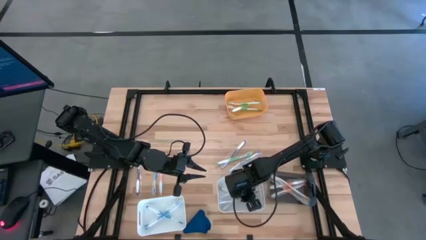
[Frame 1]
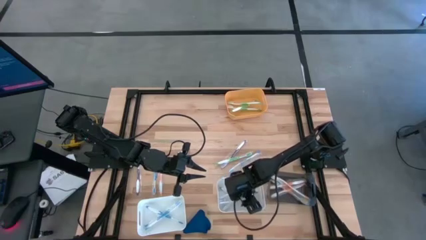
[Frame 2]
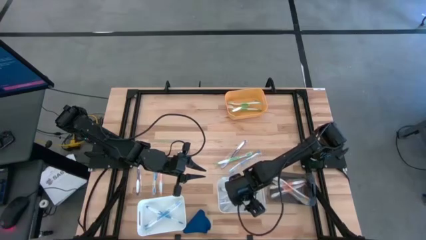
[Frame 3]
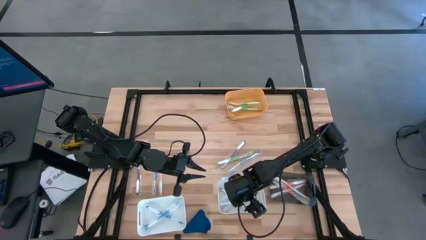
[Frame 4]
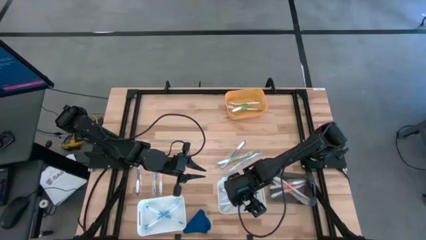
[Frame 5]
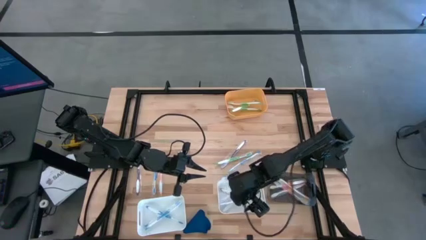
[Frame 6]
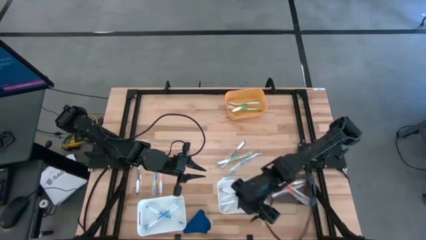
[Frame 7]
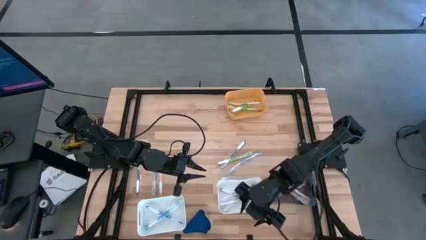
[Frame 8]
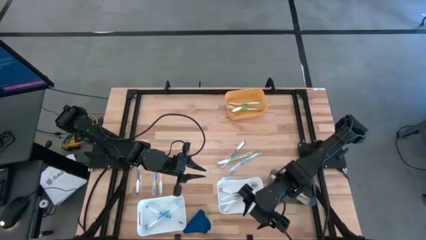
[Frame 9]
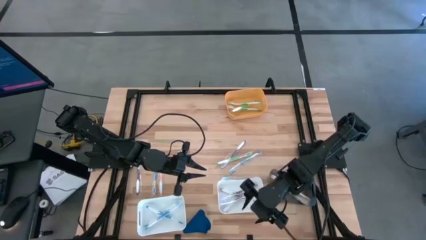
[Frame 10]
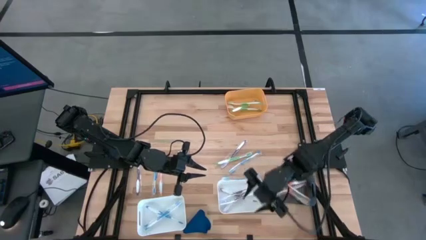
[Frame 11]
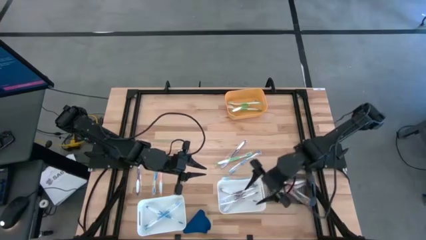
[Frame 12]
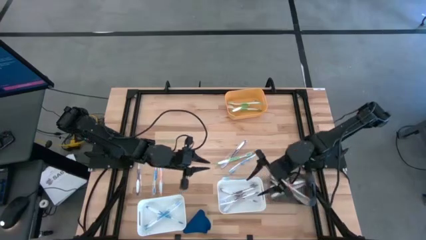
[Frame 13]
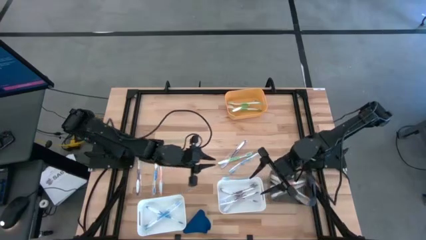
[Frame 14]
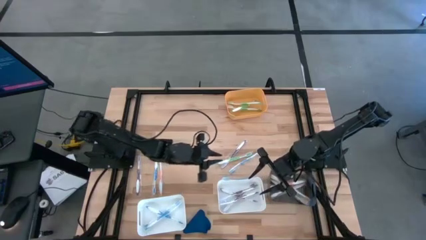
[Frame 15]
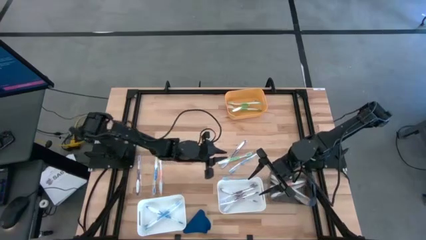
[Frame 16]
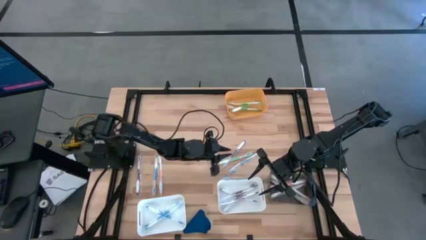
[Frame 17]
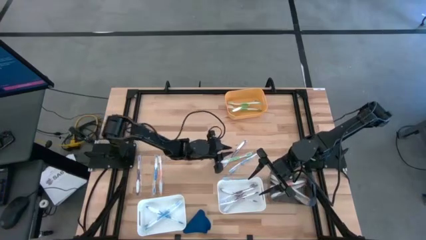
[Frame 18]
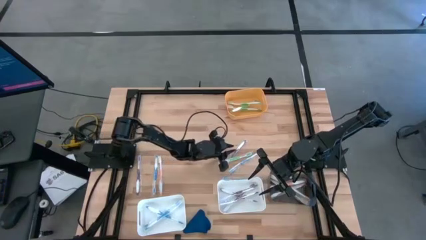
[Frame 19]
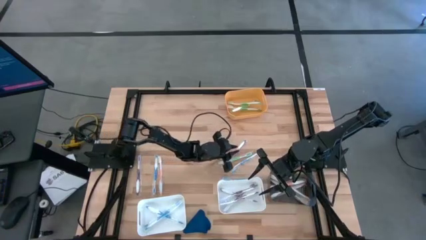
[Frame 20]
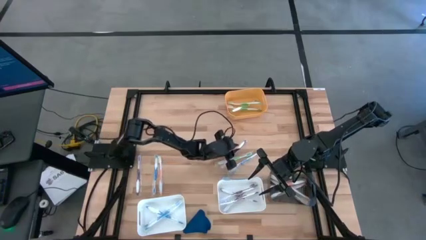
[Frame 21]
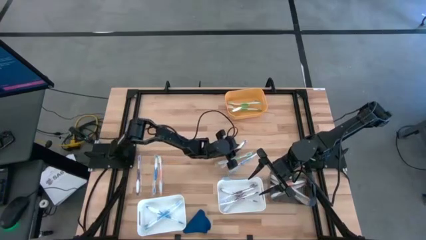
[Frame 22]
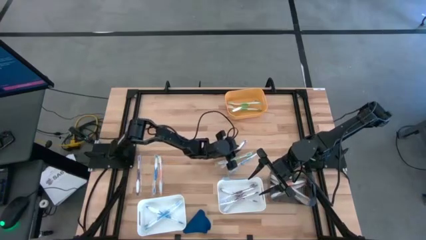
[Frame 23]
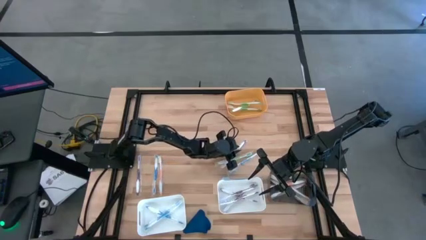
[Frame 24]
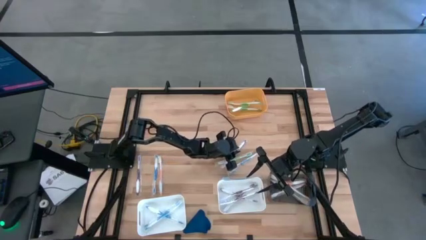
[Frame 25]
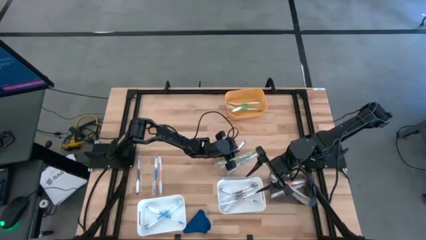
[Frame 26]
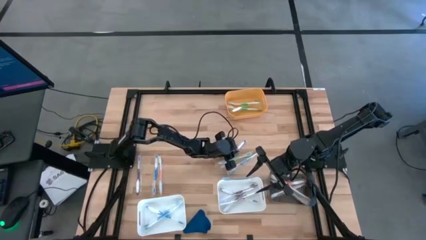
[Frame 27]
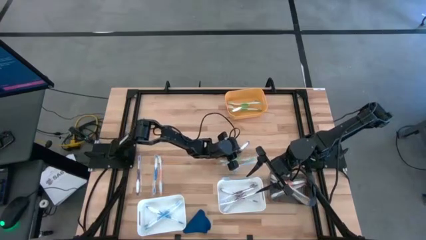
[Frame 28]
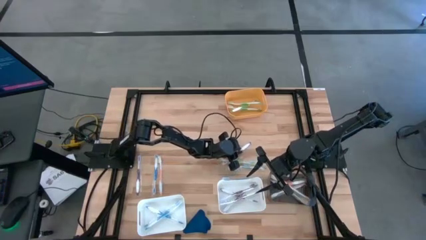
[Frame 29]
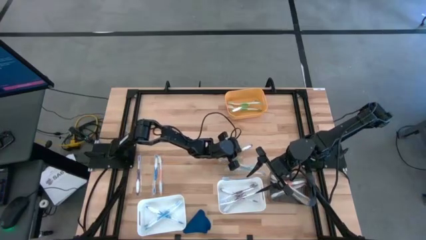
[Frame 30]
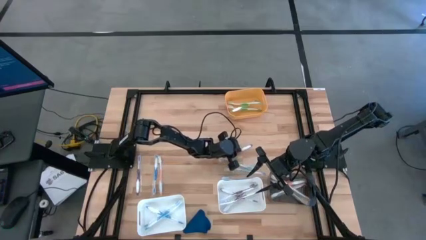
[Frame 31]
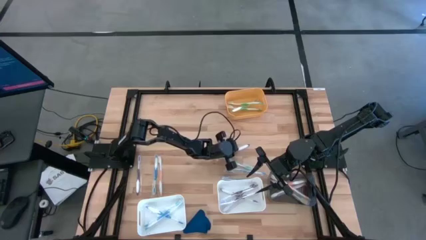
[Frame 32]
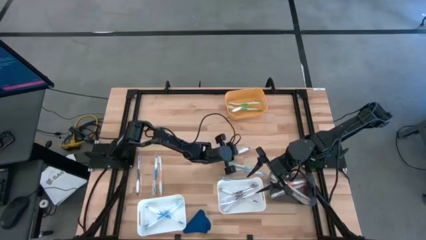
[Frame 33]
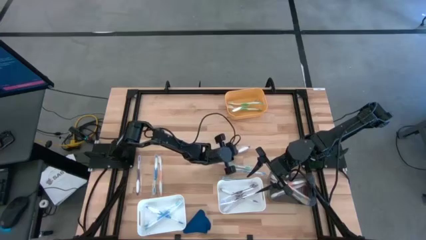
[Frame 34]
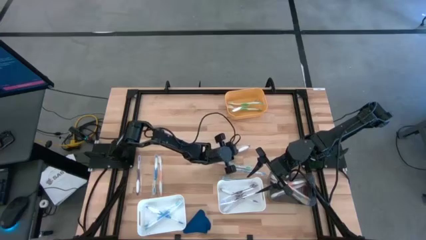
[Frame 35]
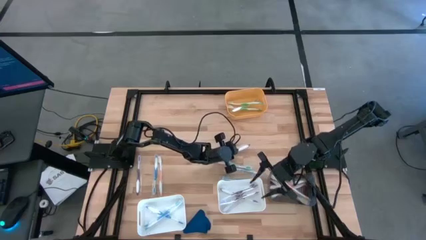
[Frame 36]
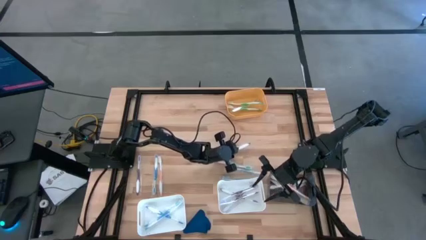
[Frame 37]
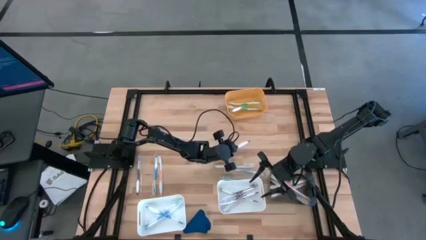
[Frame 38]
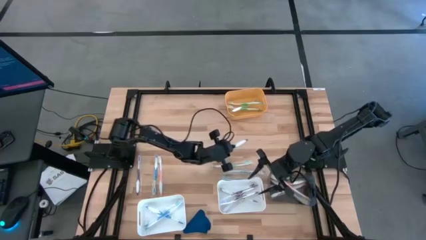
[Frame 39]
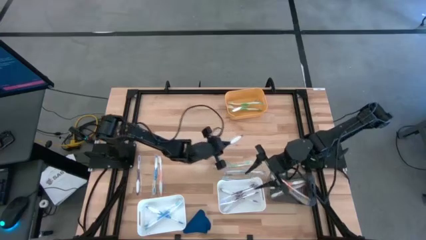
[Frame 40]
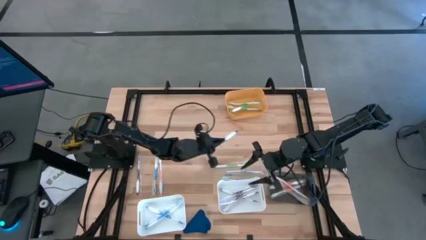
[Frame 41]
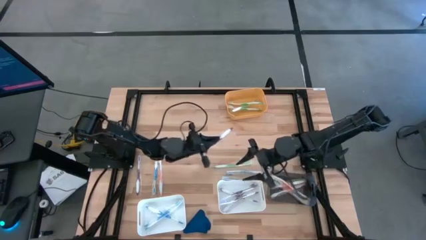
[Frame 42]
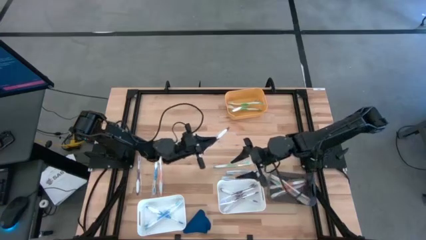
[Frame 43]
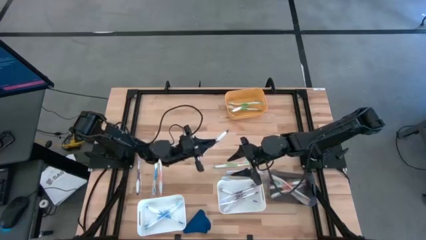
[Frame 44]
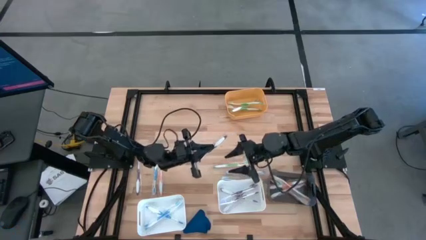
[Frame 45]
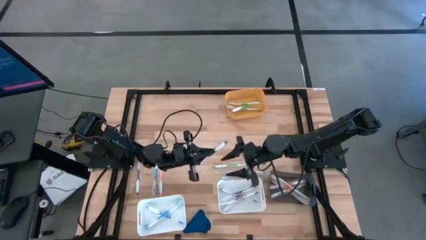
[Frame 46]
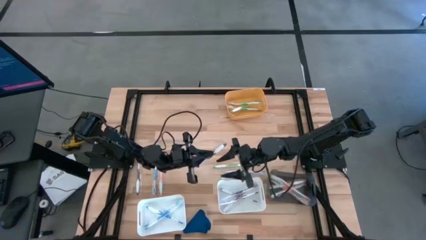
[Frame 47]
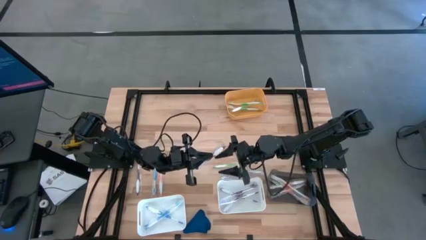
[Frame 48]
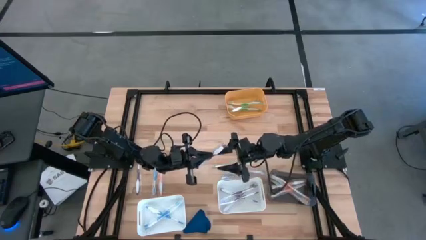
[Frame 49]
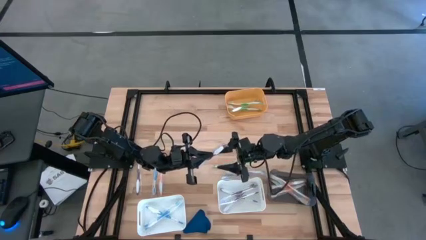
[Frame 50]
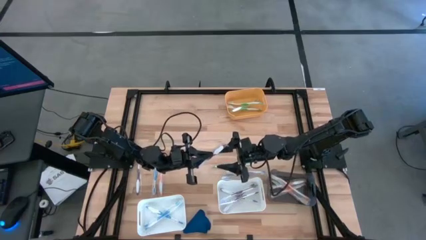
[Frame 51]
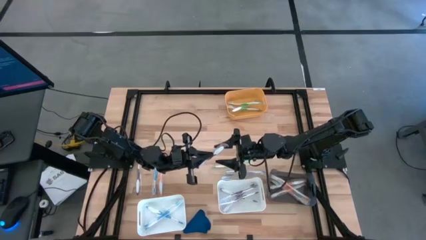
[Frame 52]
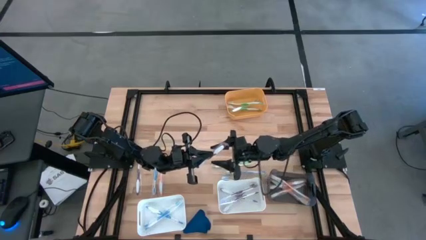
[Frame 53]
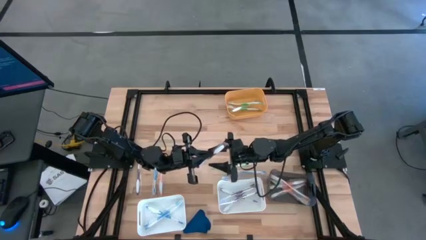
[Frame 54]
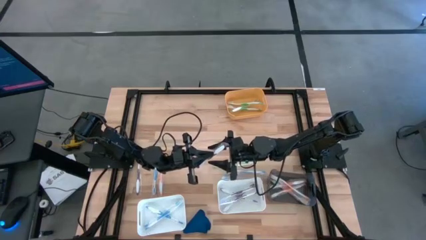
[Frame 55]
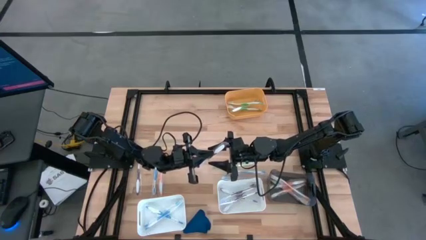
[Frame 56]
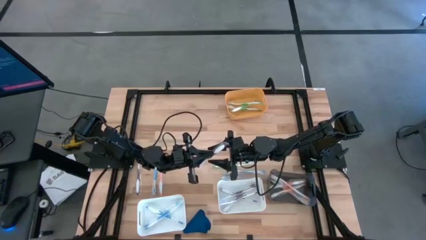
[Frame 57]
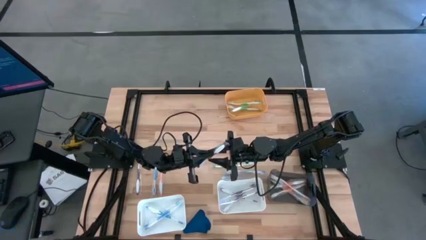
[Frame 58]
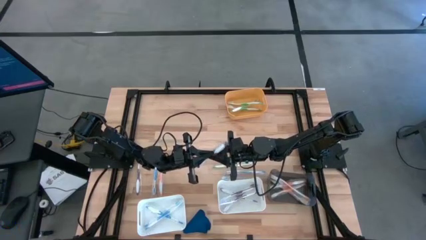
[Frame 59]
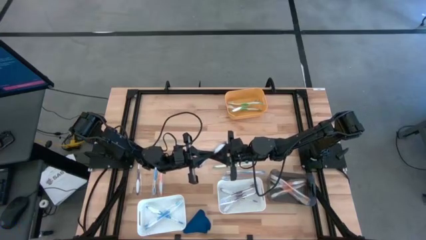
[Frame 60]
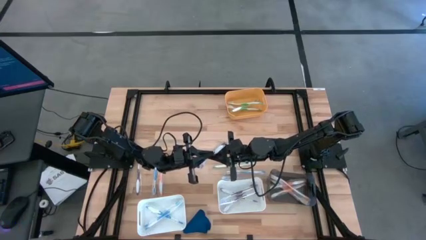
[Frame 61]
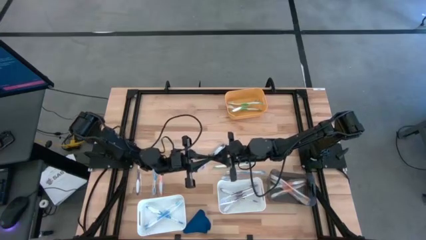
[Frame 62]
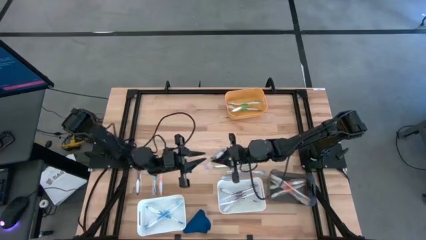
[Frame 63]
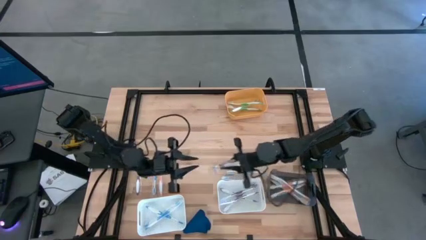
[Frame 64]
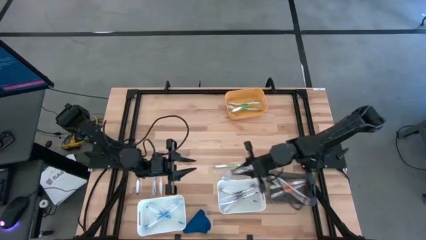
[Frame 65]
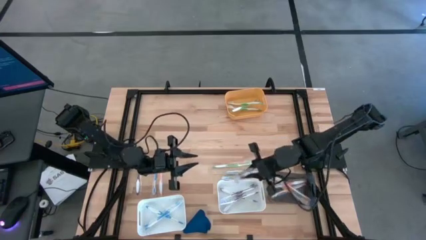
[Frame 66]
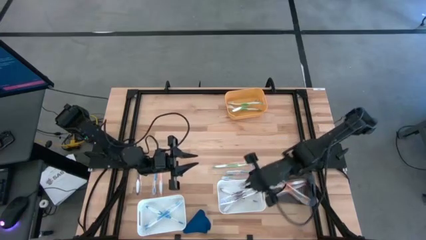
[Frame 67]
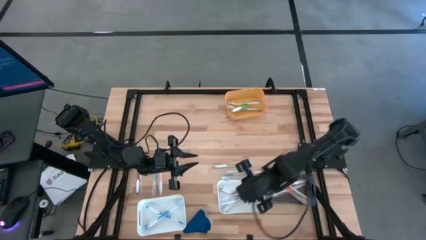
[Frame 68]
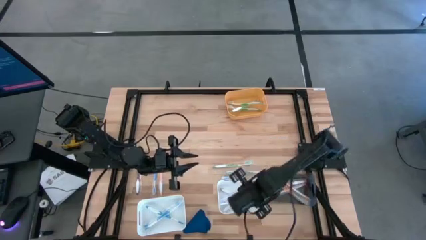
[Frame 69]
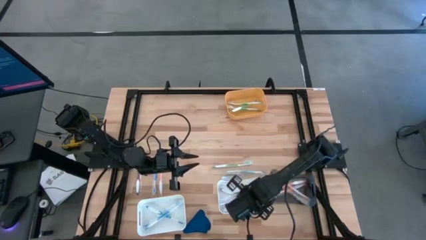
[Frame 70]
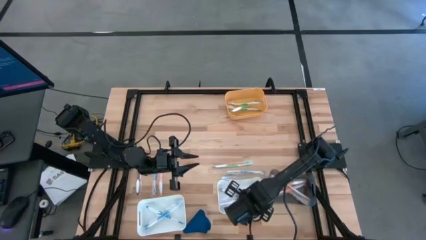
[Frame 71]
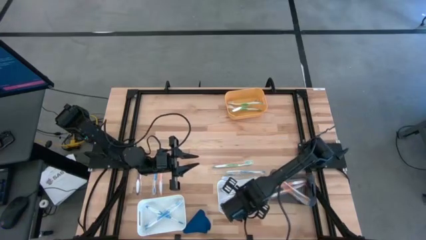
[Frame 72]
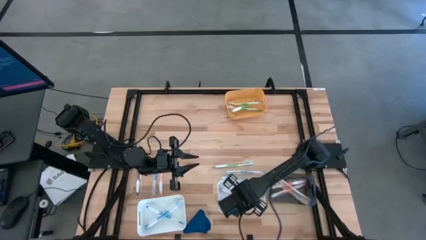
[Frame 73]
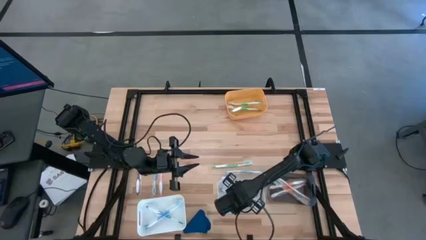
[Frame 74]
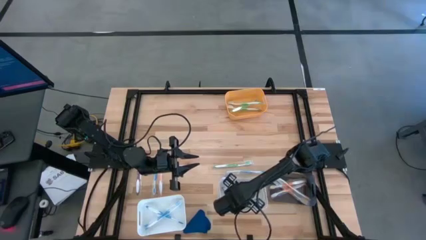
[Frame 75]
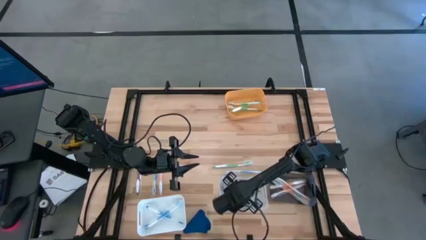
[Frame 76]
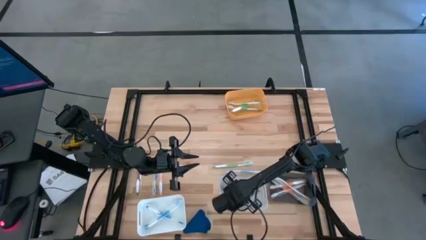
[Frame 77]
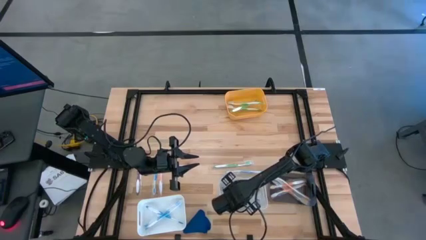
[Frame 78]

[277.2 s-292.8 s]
Task: Pick & Place Toothbrushes
Put the violet toothbrush into the right white bin
